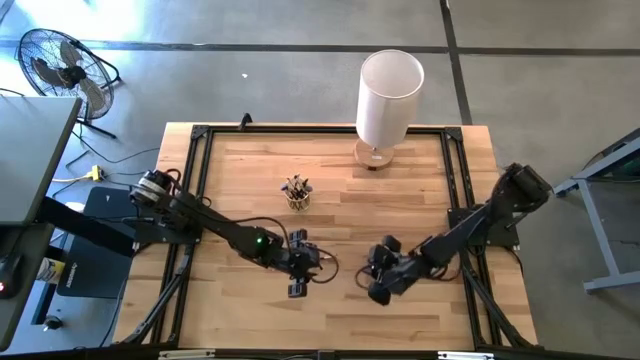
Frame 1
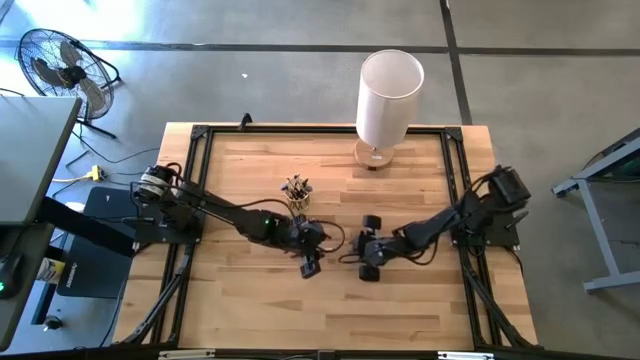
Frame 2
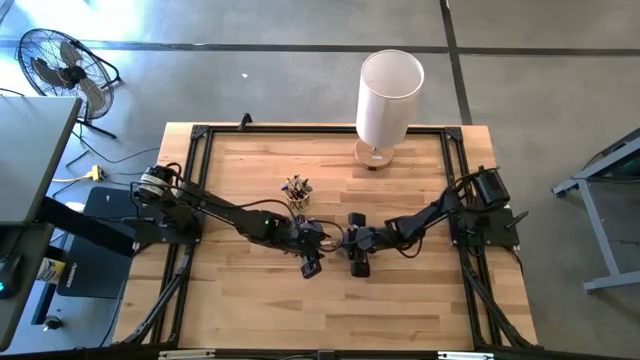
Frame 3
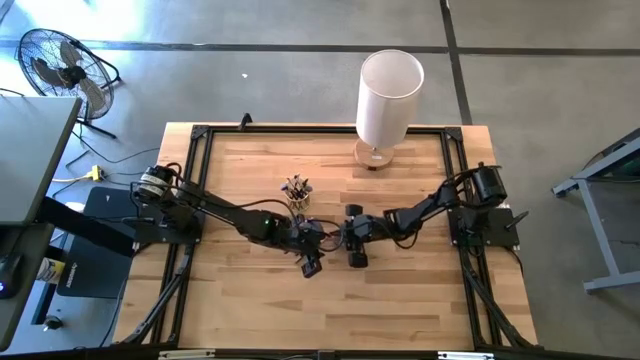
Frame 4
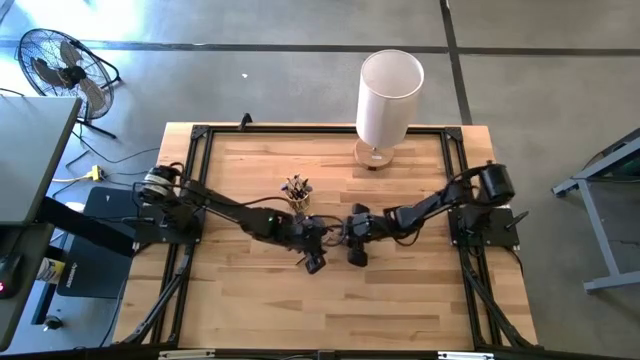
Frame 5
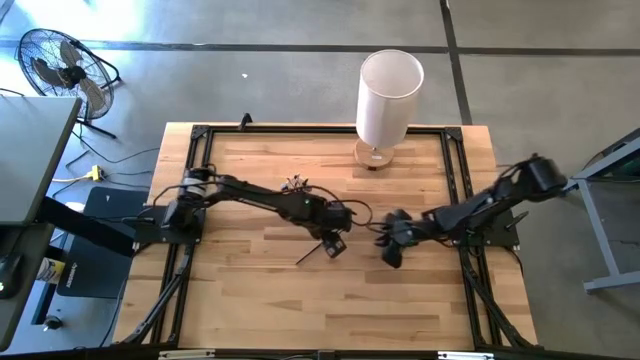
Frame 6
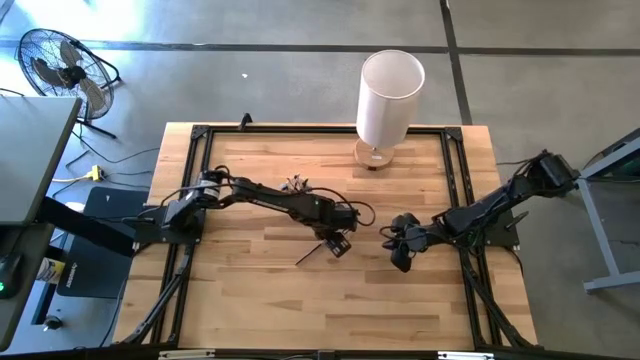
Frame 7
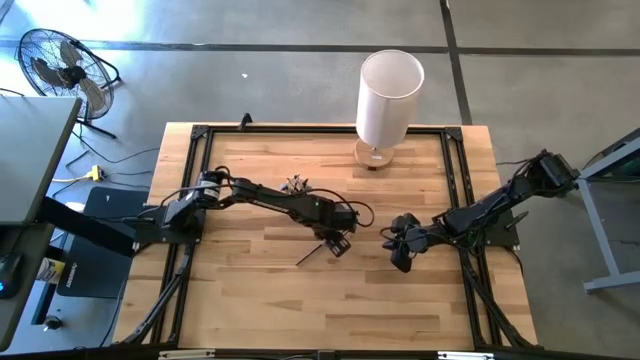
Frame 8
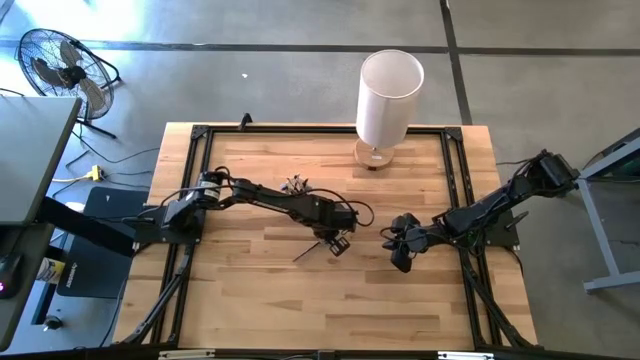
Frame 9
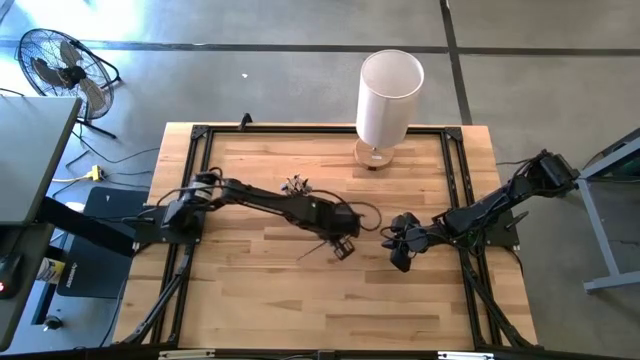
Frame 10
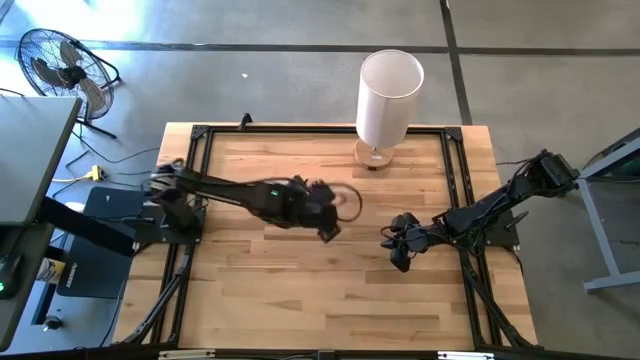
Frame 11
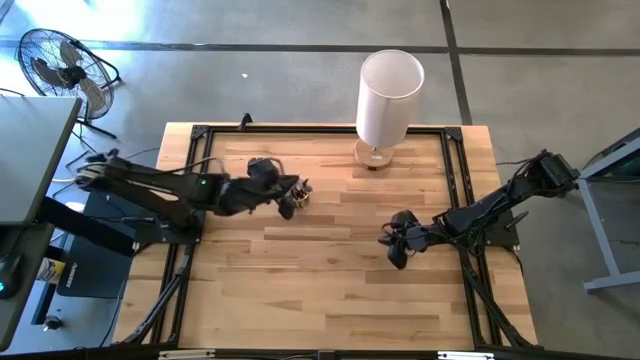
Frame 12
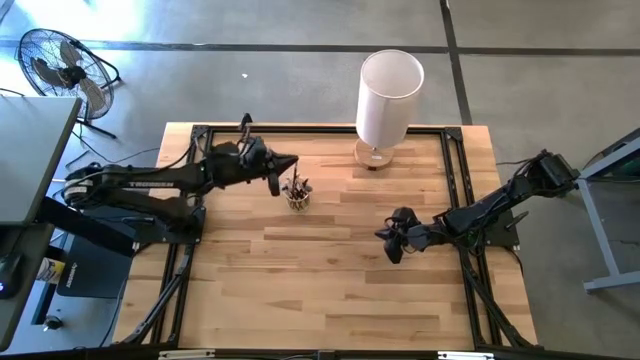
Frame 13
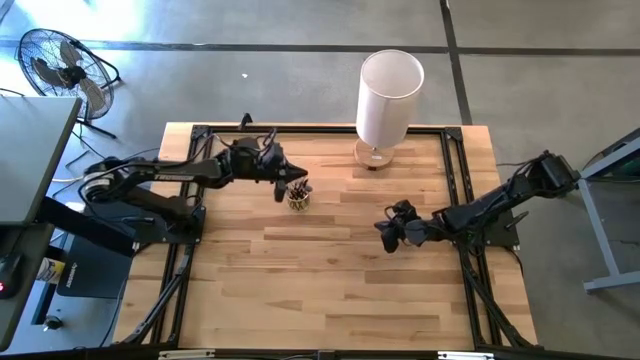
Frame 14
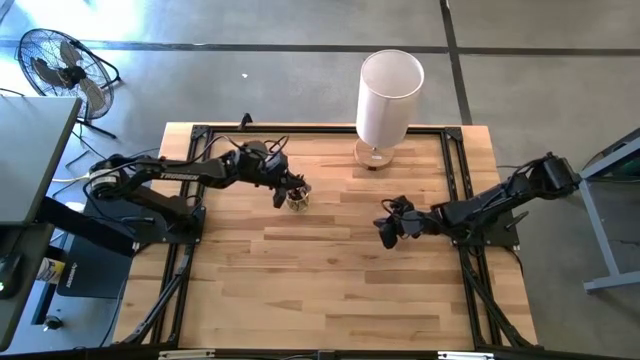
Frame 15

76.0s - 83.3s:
Task: Put items in baskets/containers
Put the black eyeshadow brush into the yellow holder

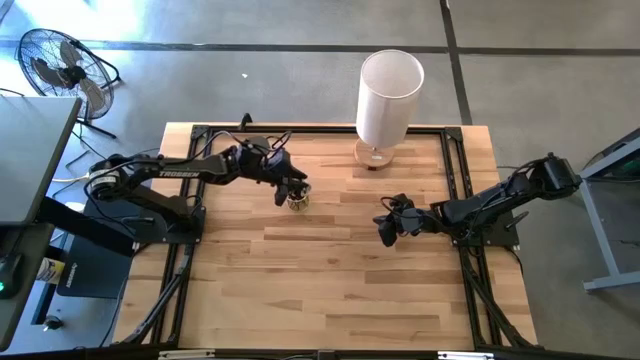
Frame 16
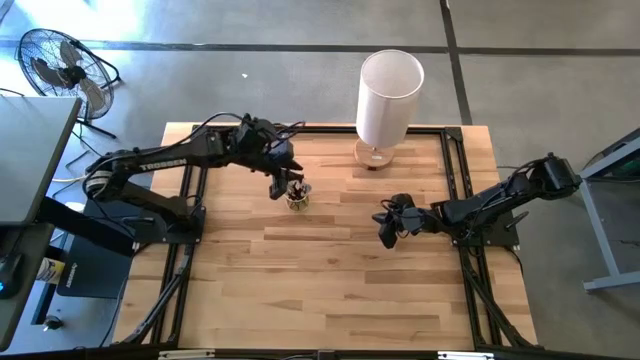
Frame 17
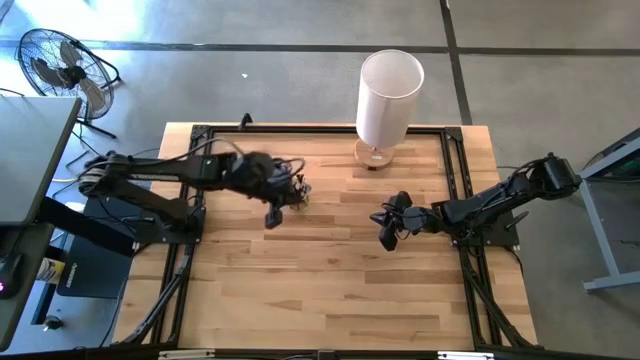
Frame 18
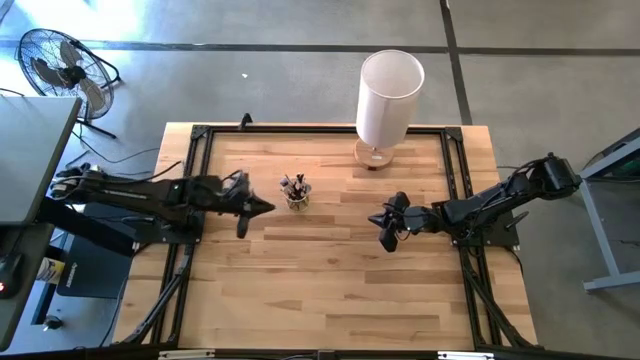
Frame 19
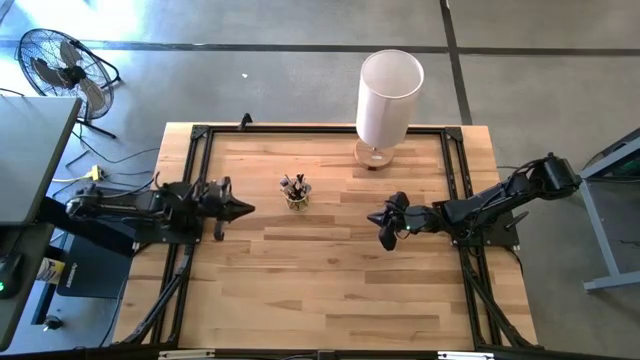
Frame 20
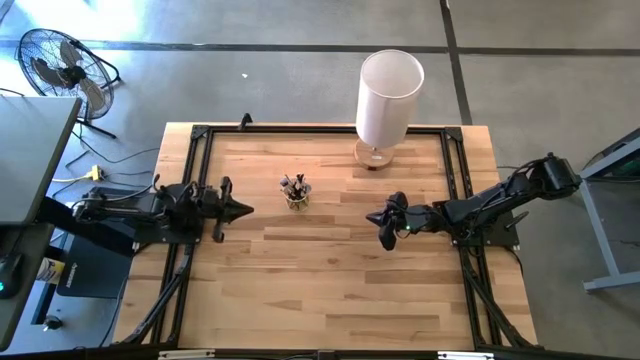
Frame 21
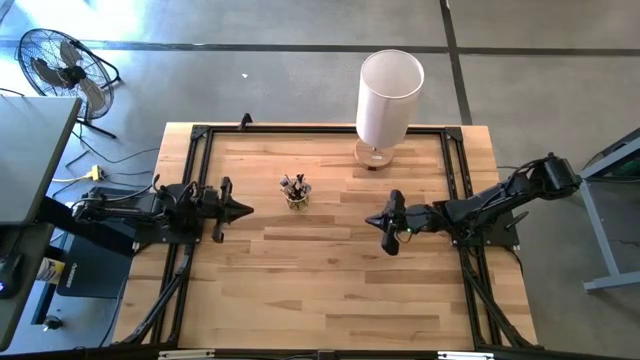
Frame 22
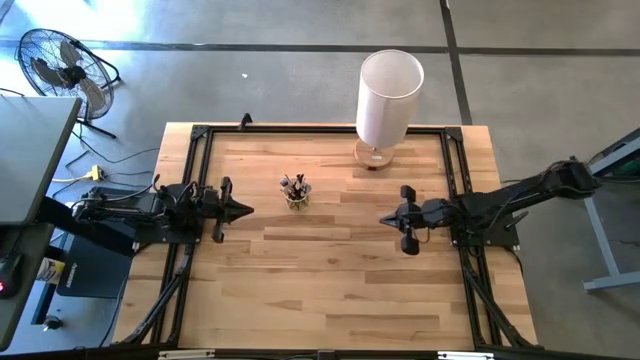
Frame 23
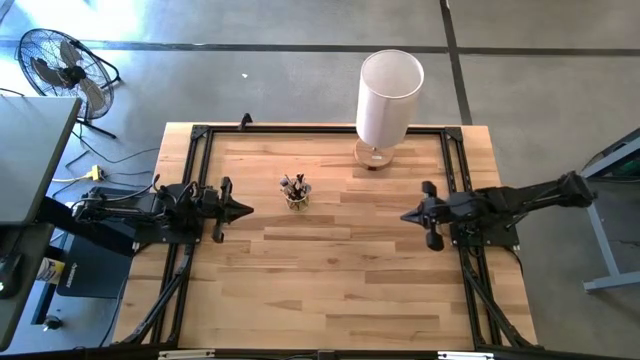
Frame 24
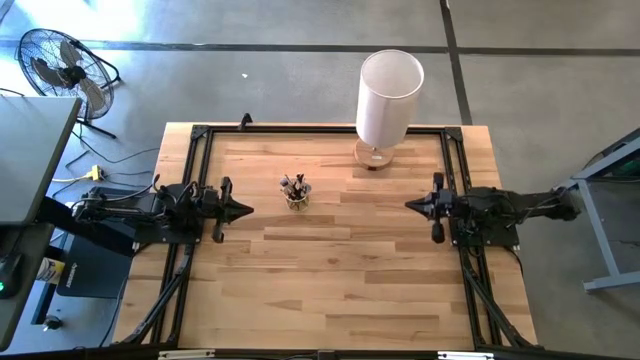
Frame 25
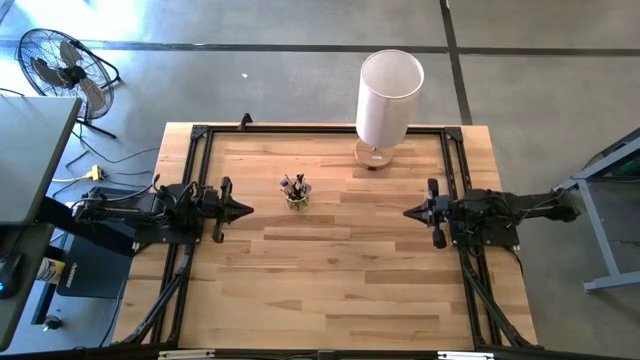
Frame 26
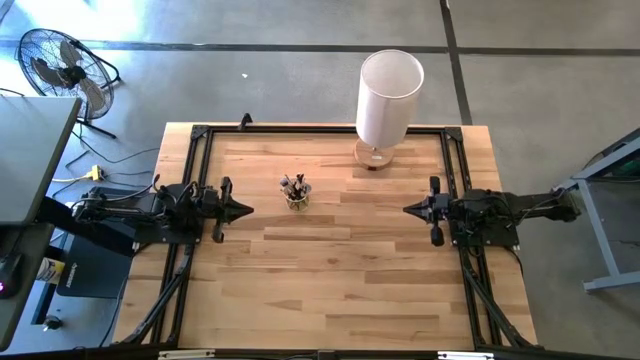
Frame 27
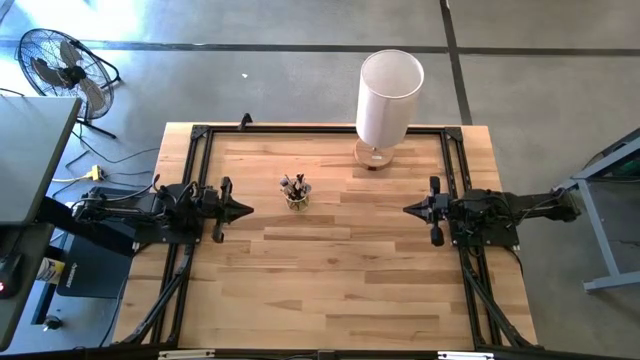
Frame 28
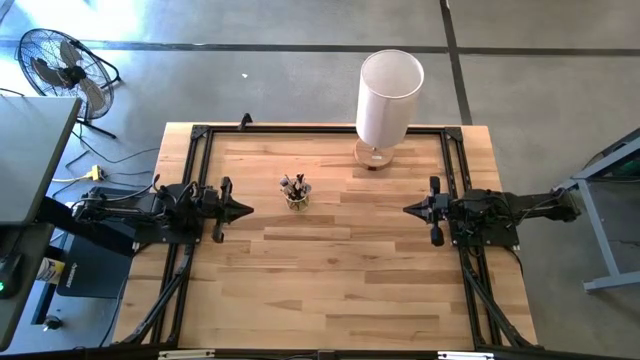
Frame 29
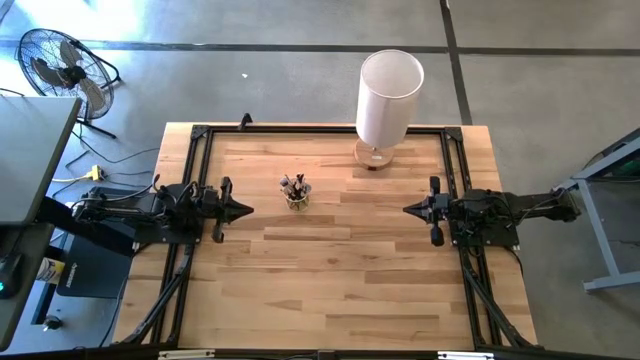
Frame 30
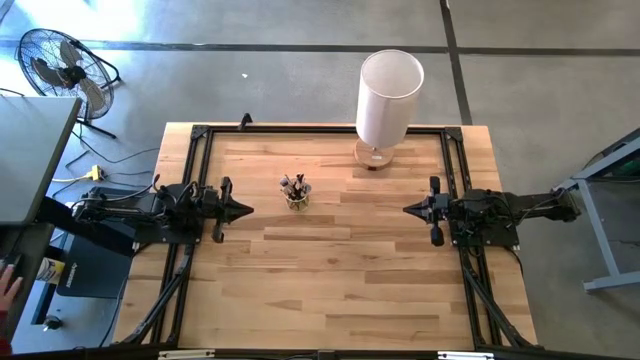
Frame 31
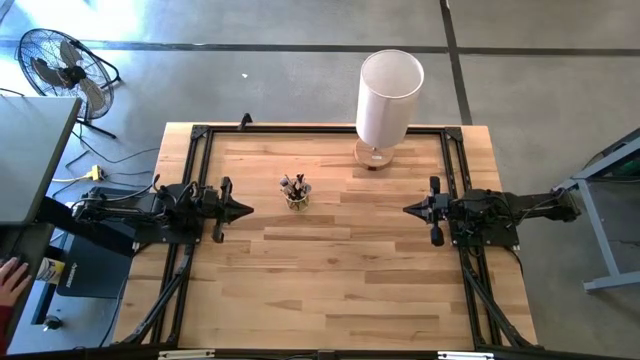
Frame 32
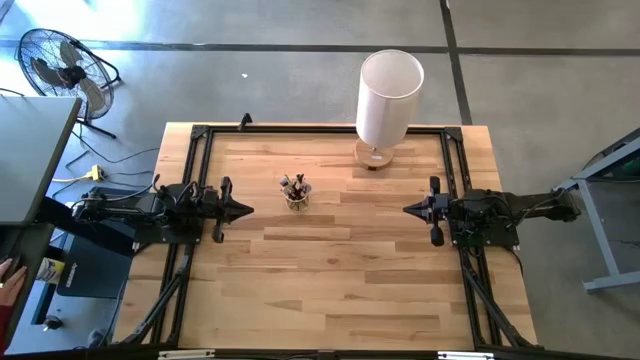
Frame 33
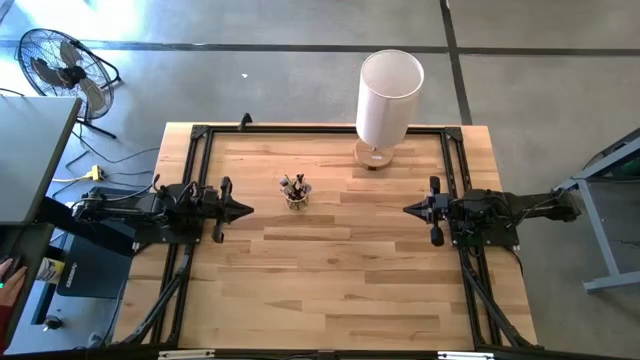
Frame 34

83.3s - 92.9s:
Return to Home Position

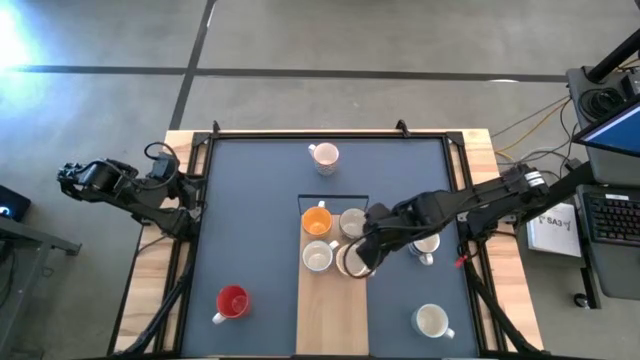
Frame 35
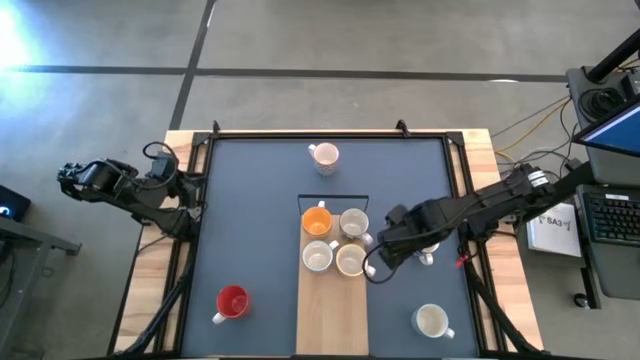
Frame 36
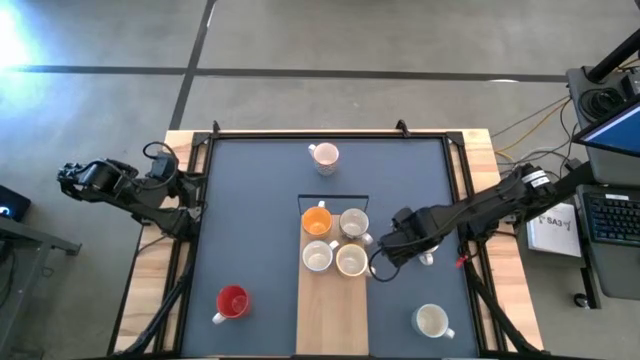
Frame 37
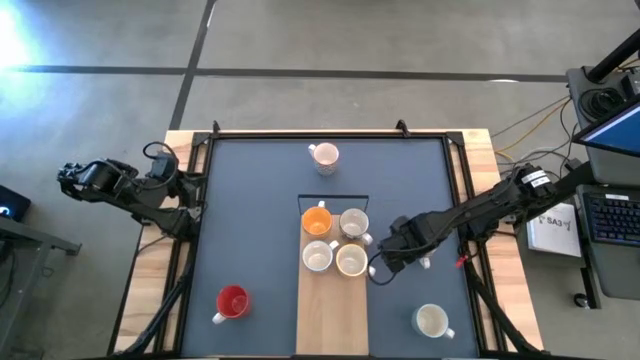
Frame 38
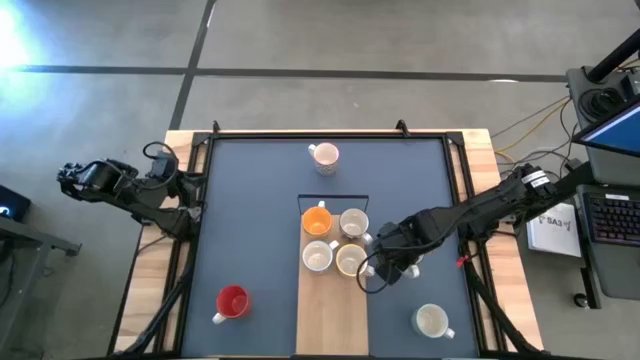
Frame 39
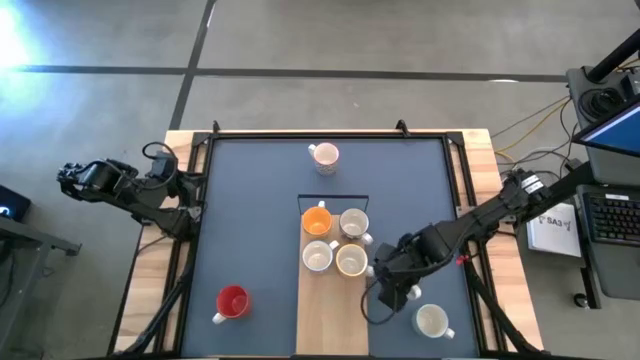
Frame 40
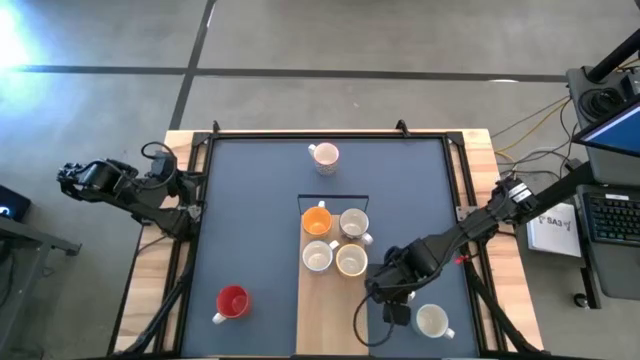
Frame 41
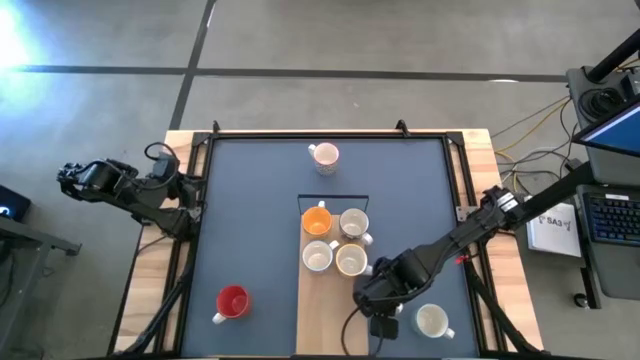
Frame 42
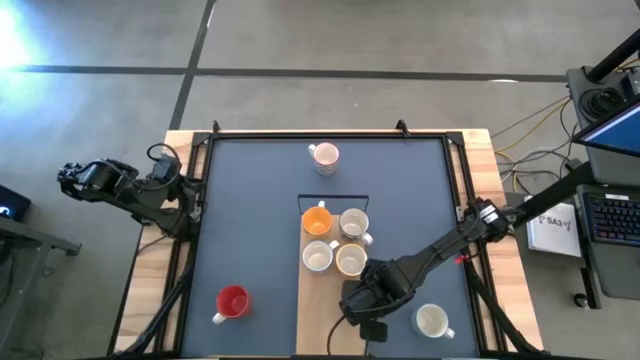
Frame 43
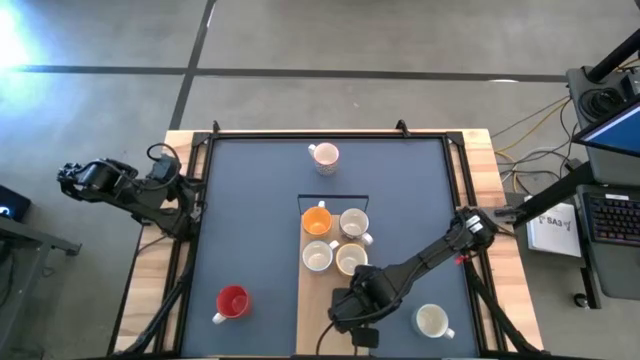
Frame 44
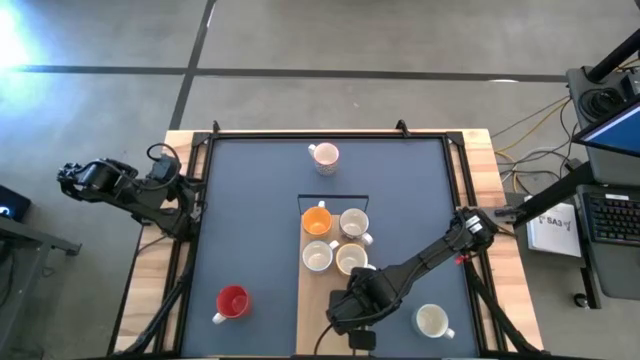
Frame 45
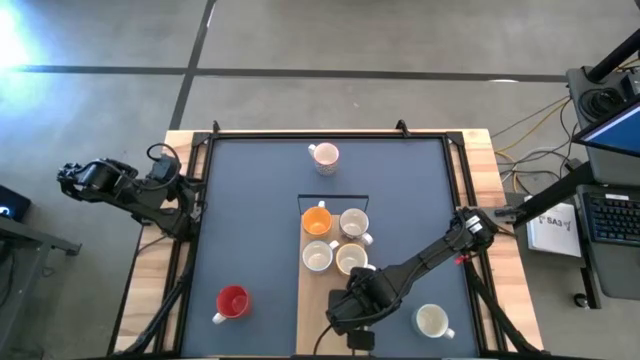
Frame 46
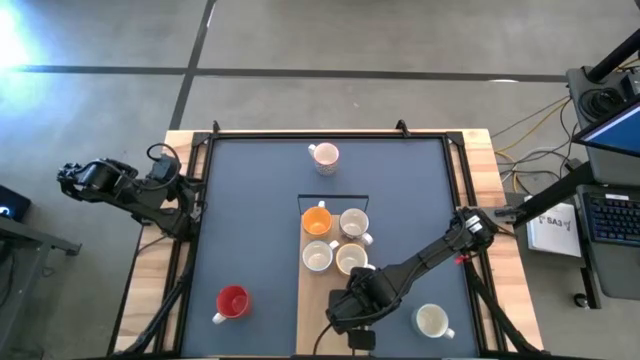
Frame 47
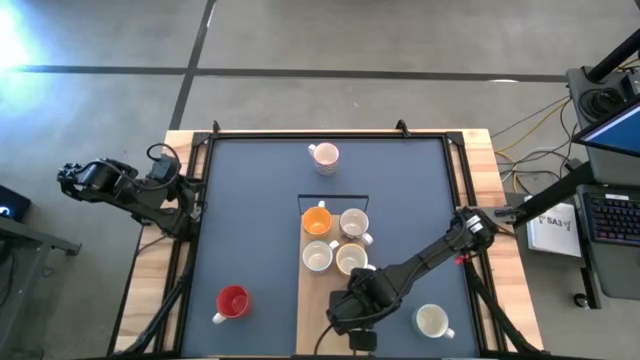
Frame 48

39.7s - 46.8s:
Task: Place coffee mugs
Put the blue mug on the shelf
